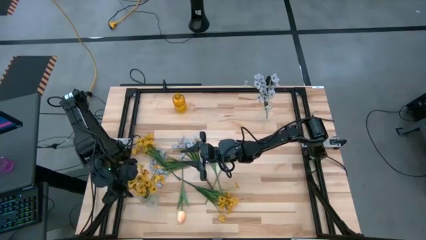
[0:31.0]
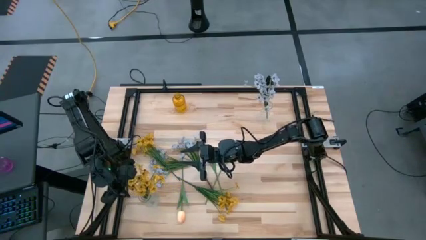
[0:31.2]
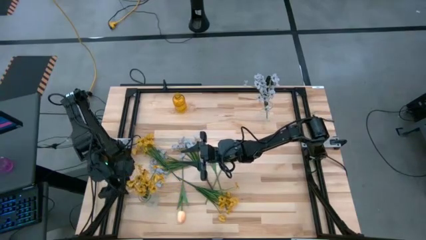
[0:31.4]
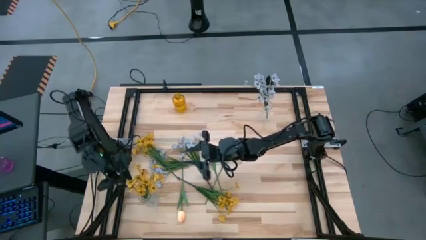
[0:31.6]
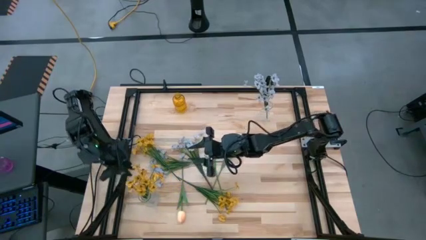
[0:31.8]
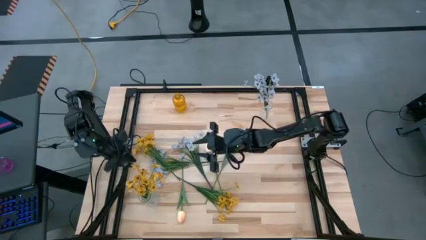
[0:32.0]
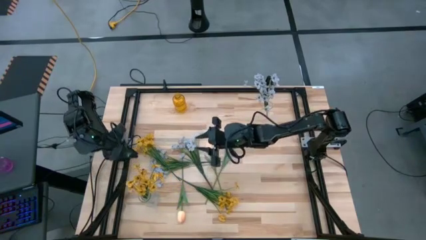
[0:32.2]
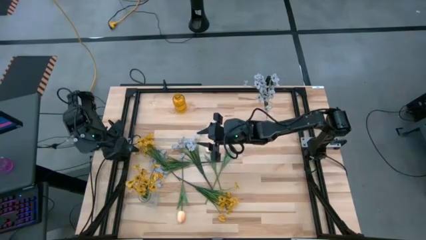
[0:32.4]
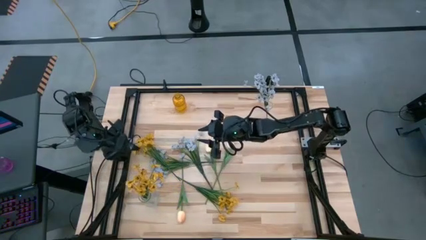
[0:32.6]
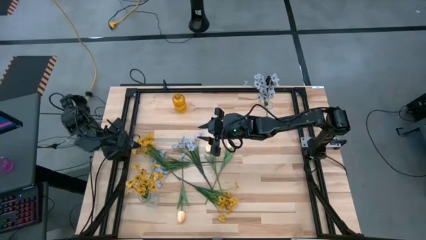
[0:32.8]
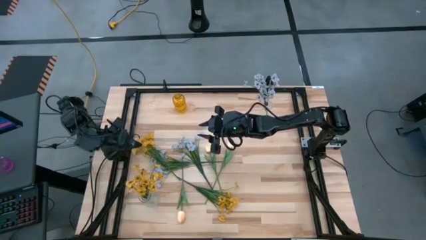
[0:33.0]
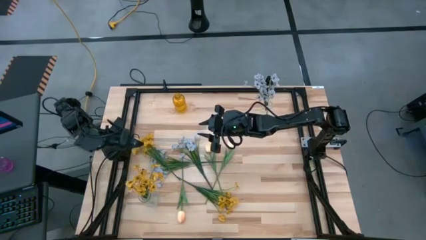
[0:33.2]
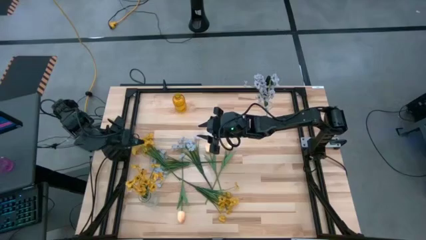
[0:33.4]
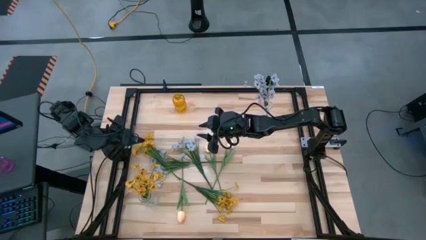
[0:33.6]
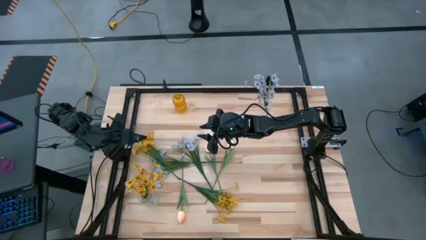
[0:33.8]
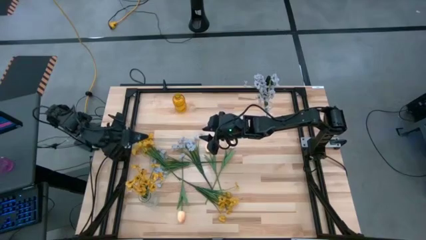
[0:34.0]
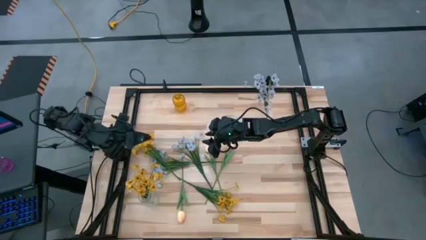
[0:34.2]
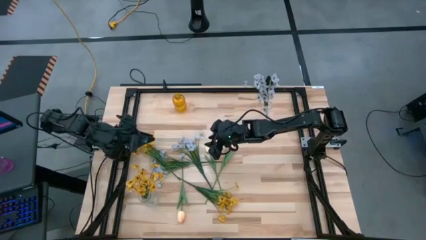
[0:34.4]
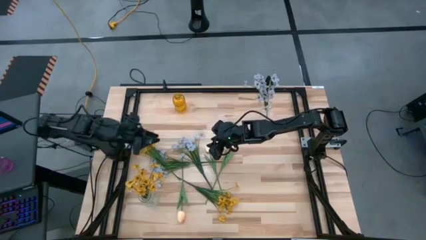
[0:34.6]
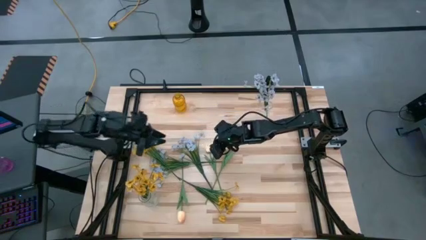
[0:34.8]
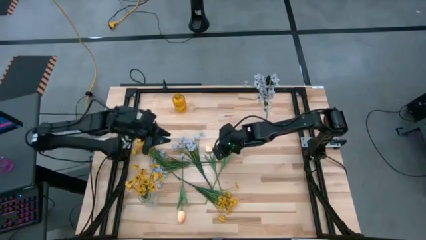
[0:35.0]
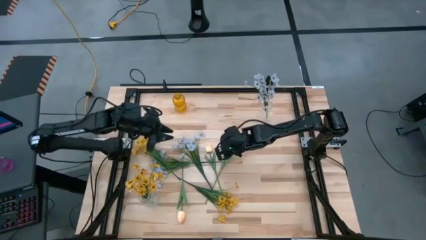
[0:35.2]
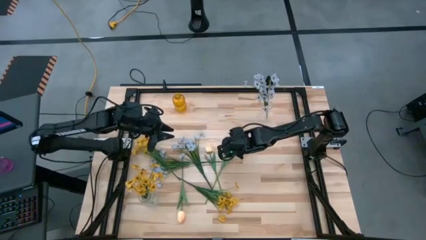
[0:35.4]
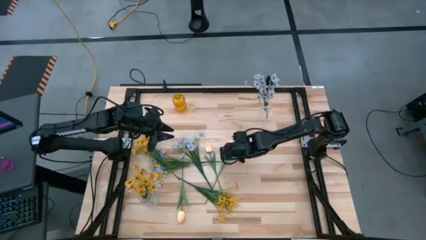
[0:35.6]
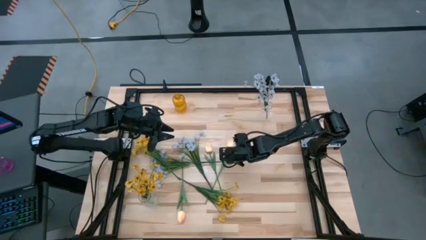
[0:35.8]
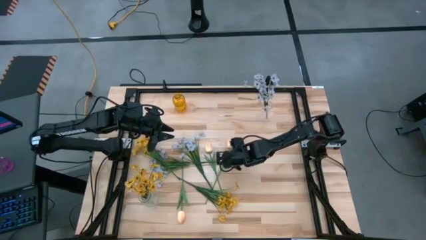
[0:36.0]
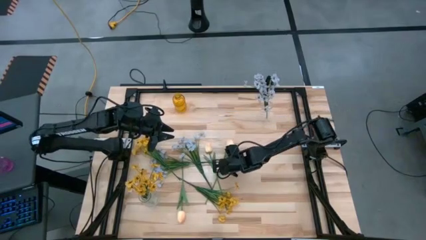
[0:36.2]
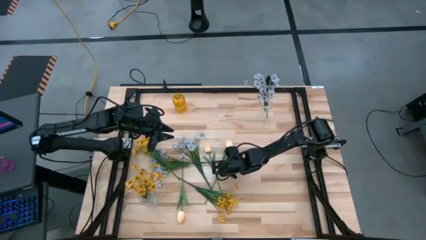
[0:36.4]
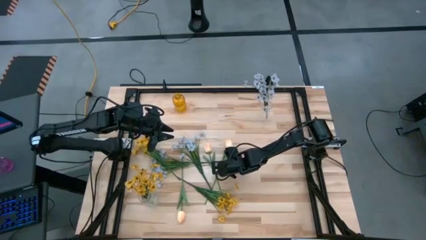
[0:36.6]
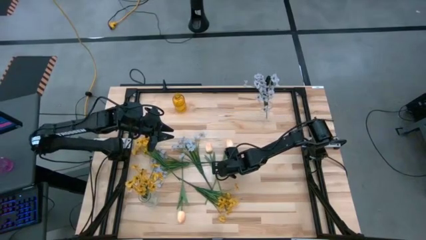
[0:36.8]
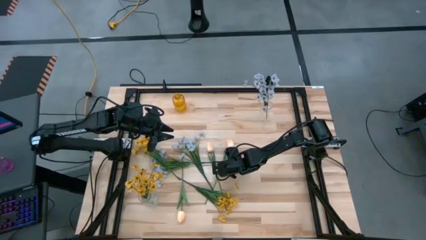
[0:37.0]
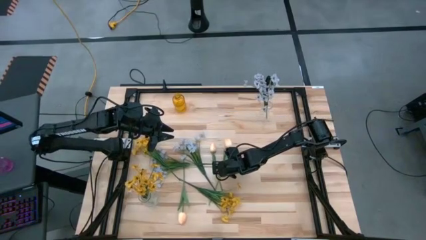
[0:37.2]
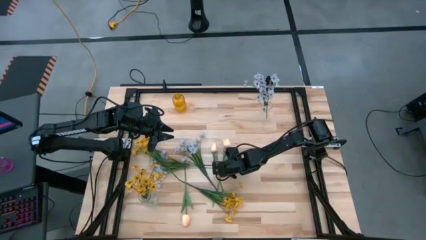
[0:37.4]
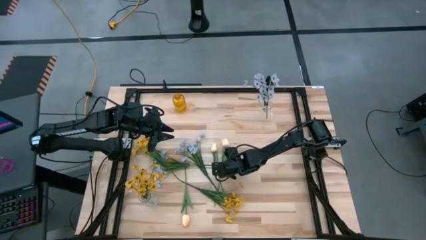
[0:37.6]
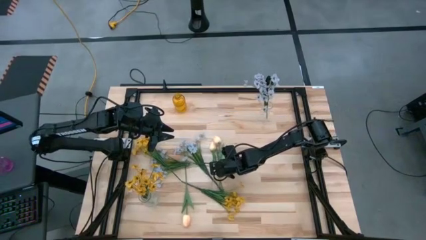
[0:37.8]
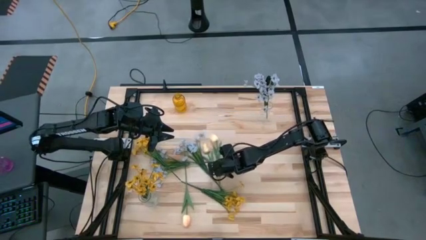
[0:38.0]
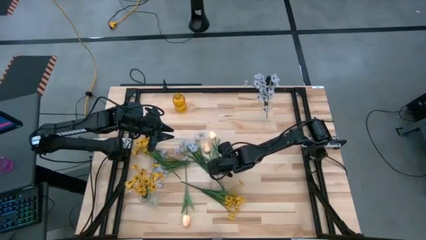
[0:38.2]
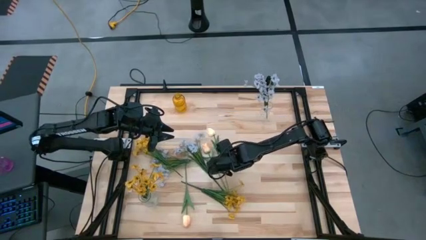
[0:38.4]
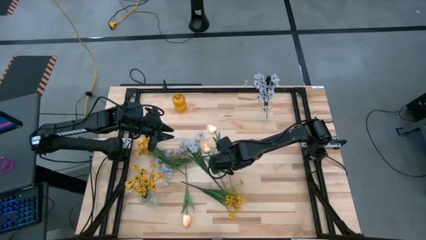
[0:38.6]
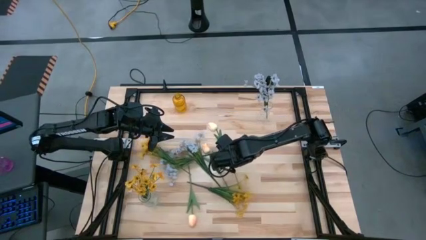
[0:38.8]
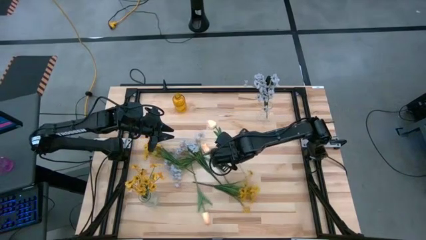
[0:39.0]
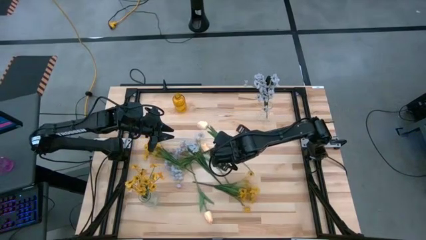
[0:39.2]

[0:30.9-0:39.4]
Task: Sort flowers into vase by color
Put the top right pink tulip into the yellow vase

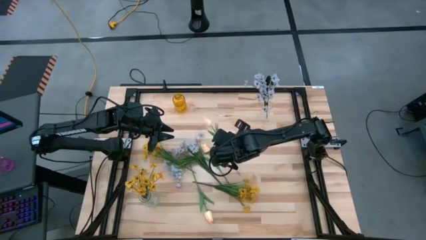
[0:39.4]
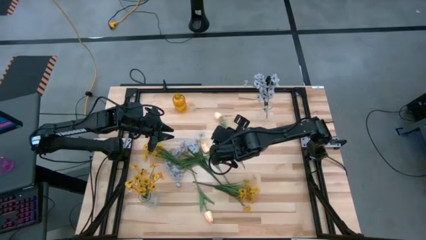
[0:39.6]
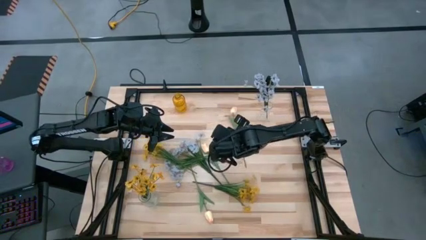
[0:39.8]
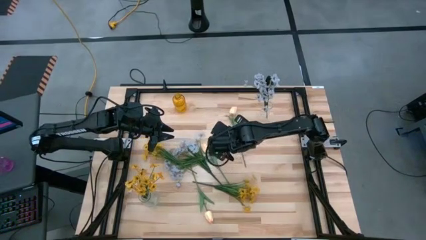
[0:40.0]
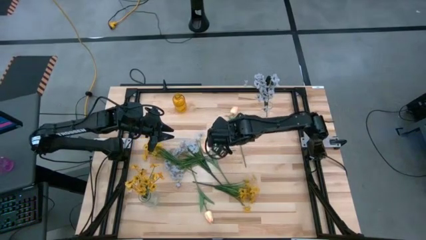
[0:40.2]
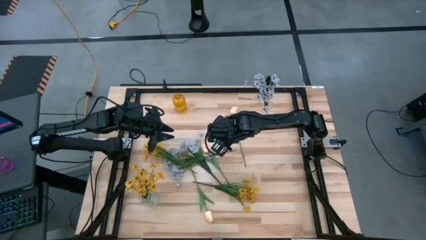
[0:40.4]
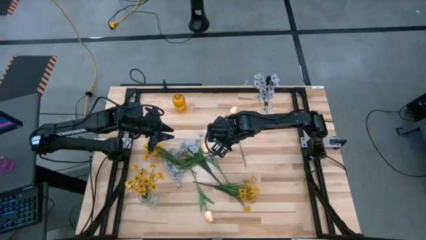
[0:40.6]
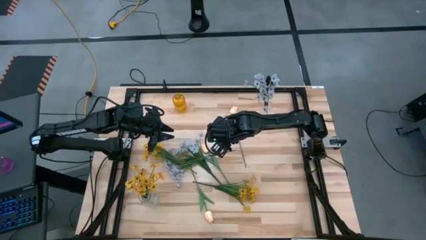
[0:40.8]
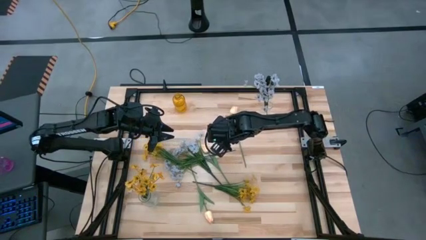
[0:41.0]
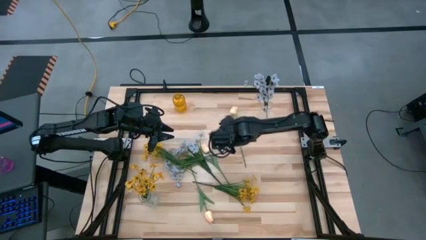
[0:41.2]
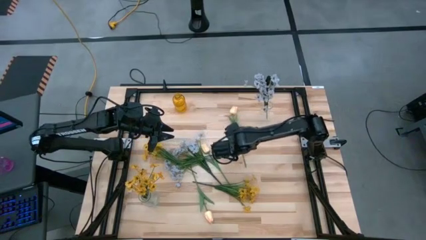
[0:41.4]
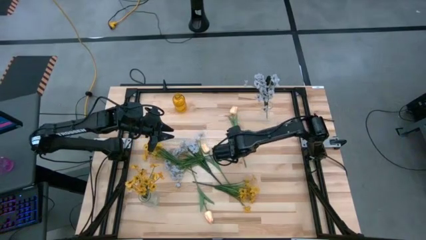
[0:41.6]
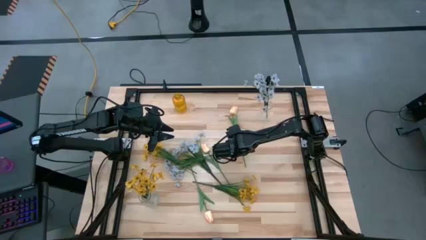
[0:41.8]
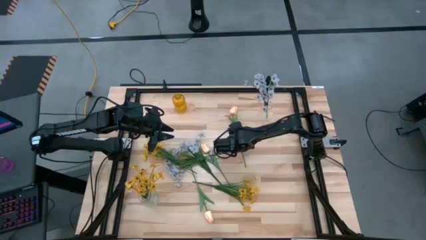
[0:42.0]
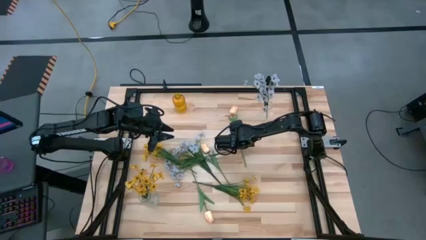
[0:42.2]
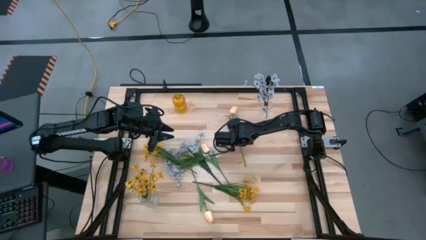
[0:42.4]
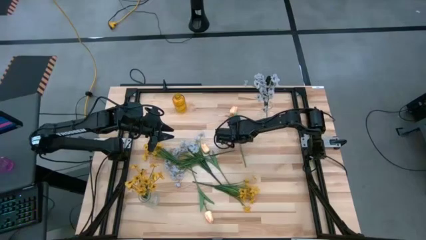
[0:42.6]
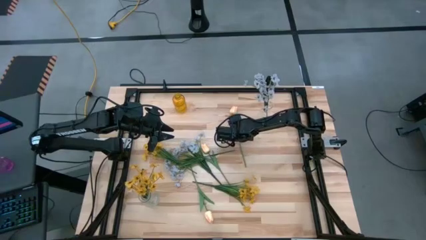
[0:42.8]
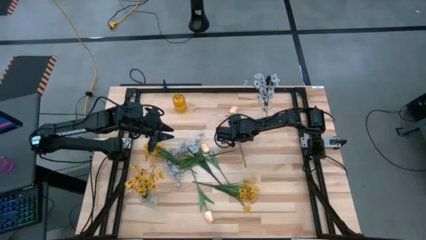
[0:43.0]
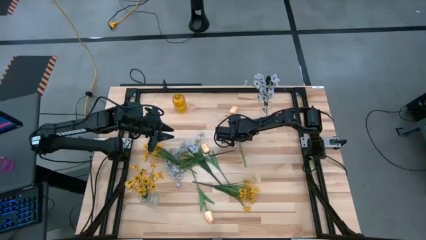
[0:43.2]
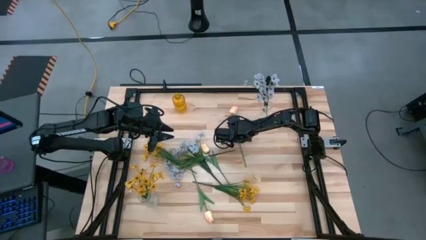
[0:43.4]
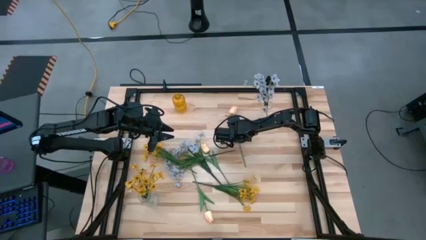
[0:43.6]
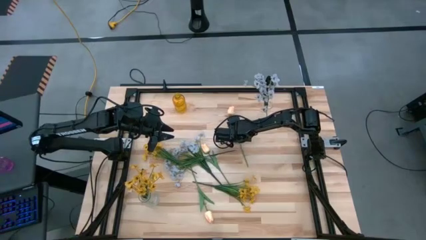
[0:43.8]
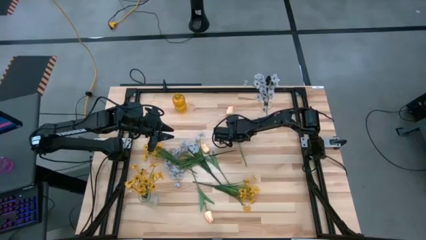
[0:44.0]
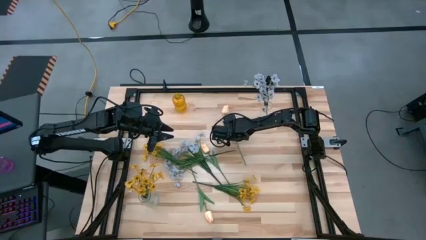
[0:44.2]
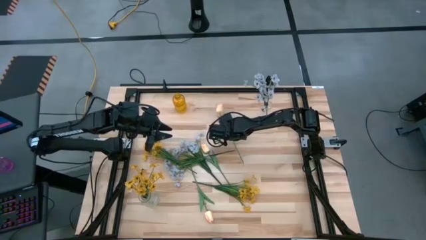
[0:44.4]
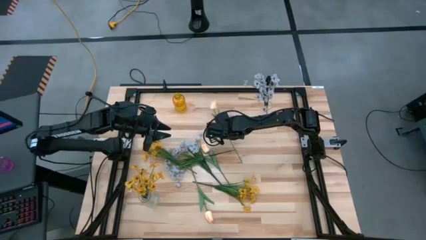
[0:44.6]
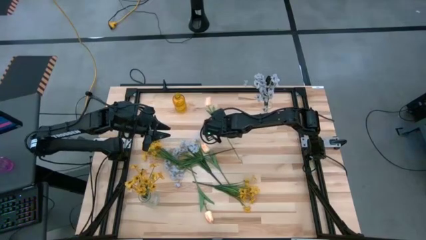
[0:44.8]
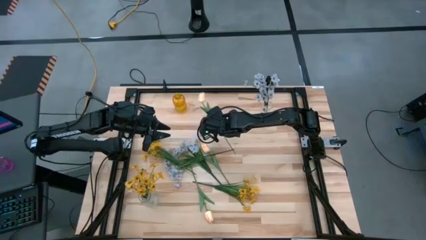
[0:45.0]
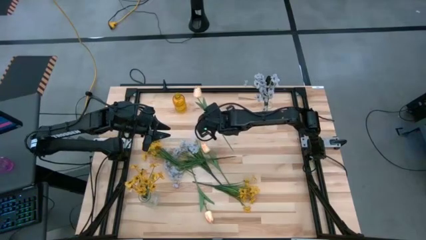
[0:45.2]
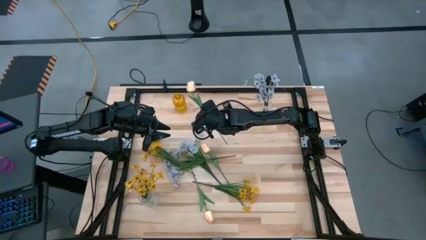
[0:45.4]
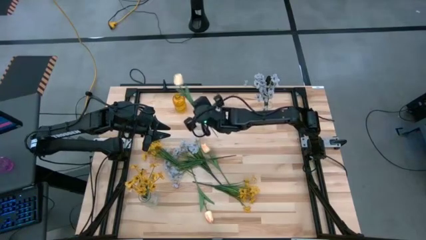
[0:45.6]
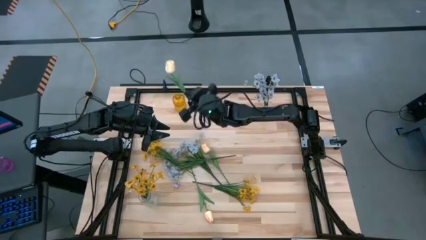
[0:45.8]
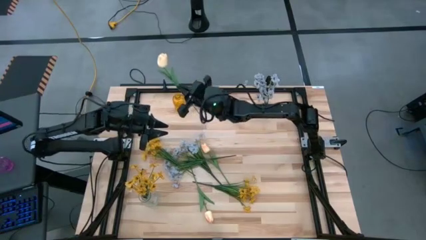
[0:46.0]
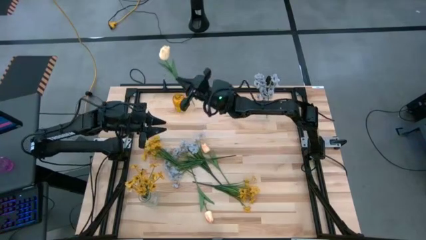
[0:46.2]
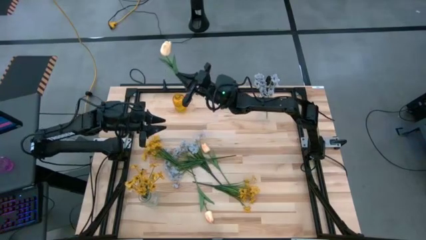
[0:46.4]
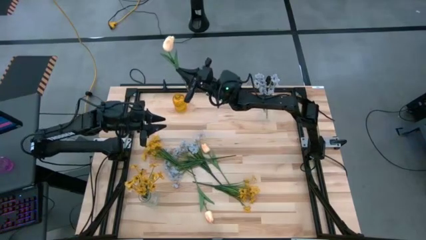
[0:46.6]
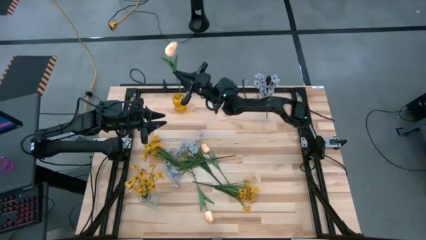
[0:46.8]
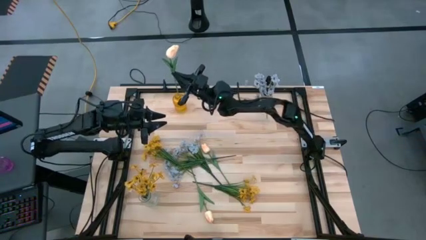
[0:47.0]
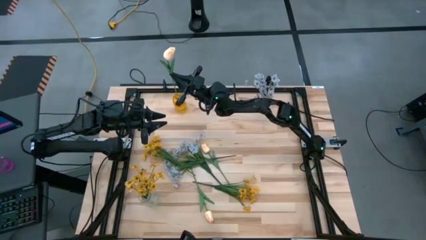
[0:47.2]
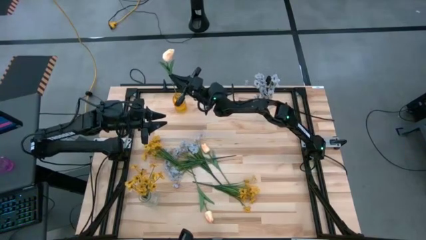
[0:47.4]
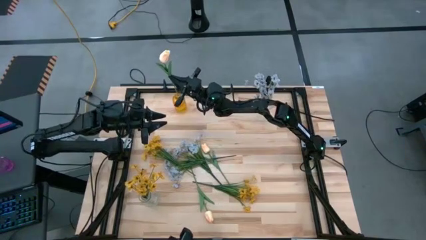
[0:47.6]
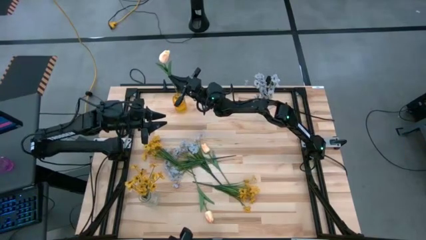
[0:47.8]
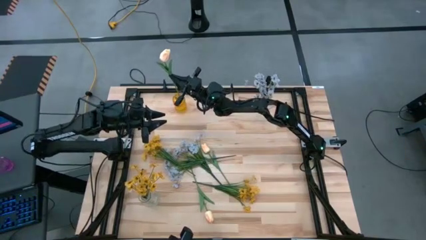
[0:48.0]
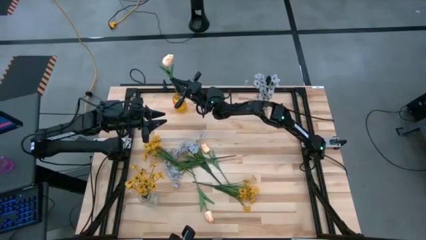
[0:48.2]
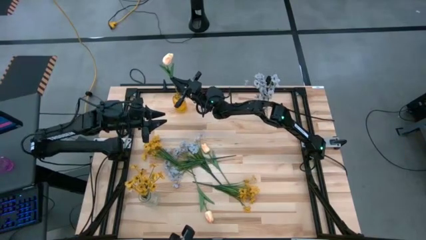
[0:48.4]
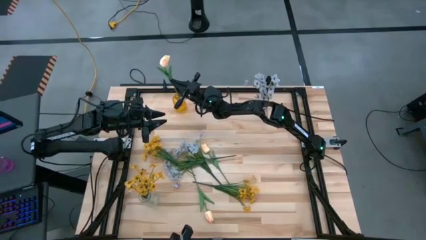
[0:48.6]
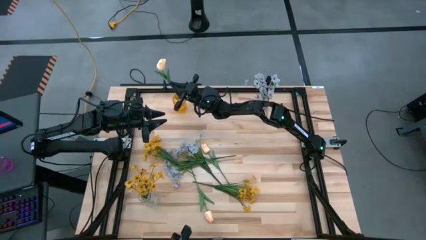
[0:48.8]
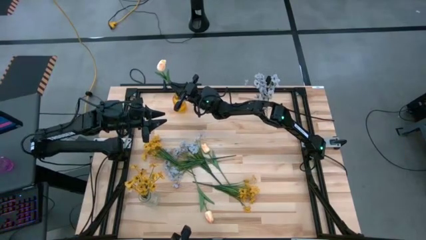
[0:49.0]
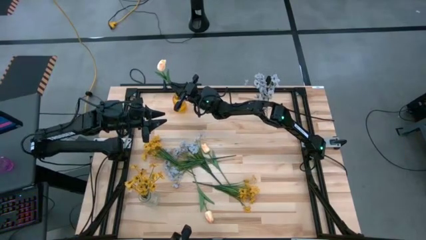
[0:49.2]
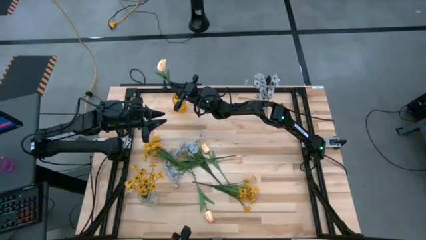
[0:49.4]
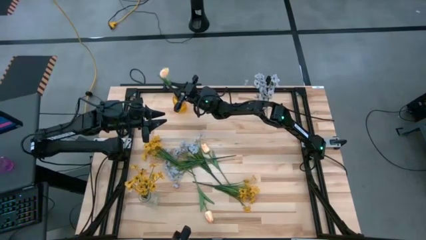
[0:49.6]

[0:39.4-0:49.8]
Put the top right pink tulip into the yellow vase
